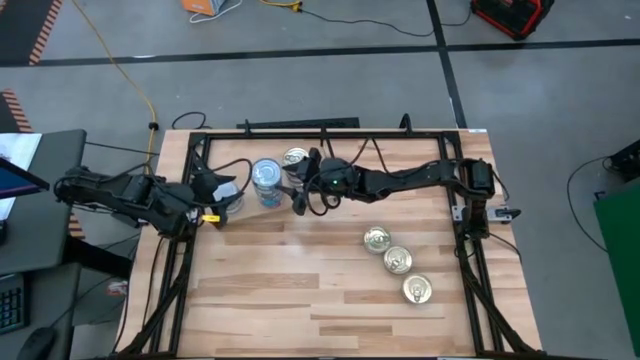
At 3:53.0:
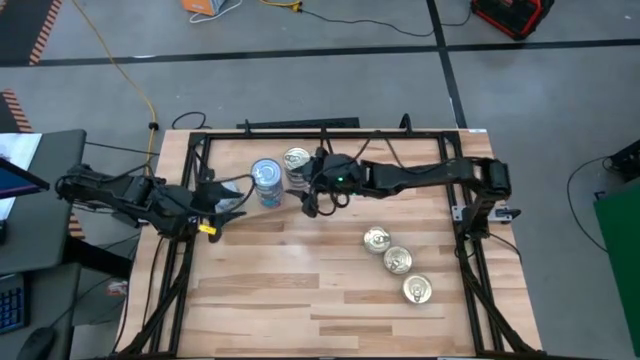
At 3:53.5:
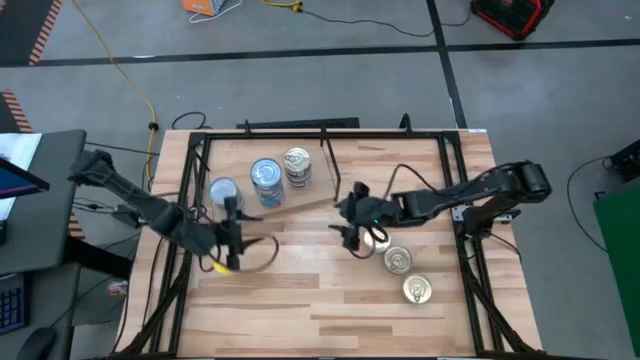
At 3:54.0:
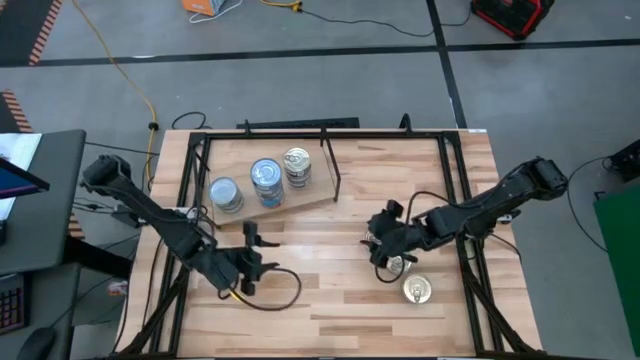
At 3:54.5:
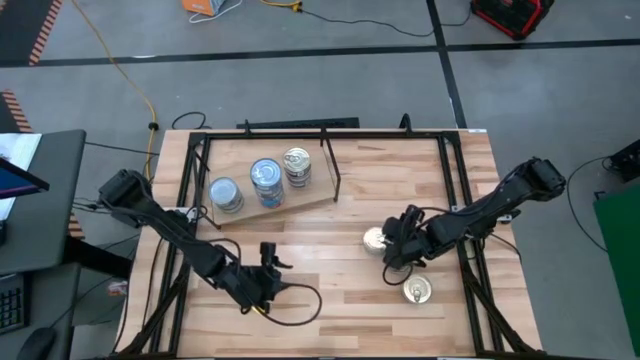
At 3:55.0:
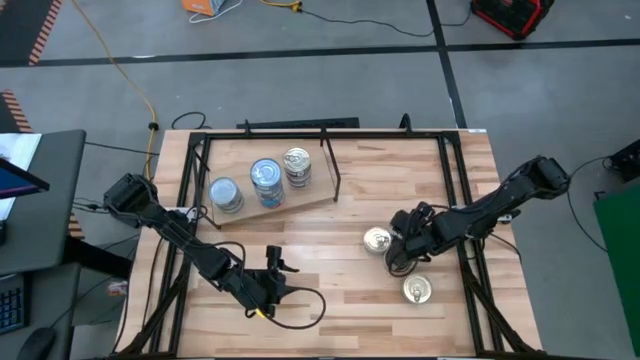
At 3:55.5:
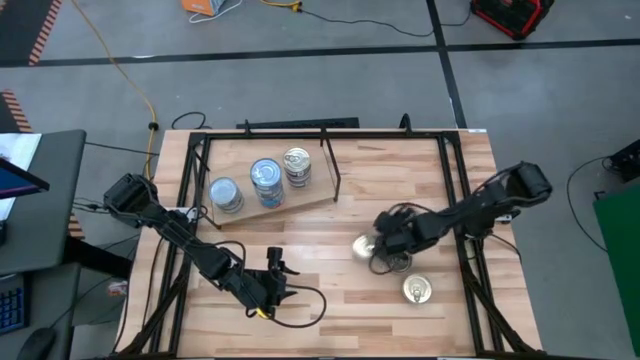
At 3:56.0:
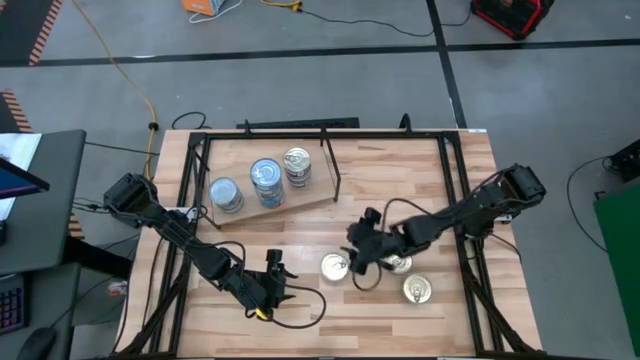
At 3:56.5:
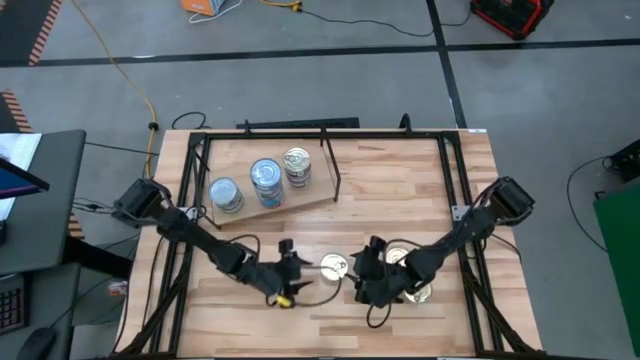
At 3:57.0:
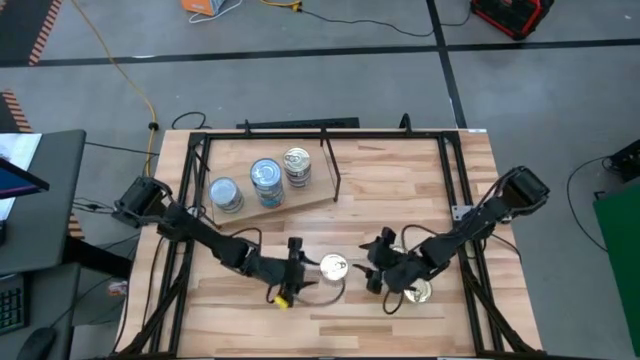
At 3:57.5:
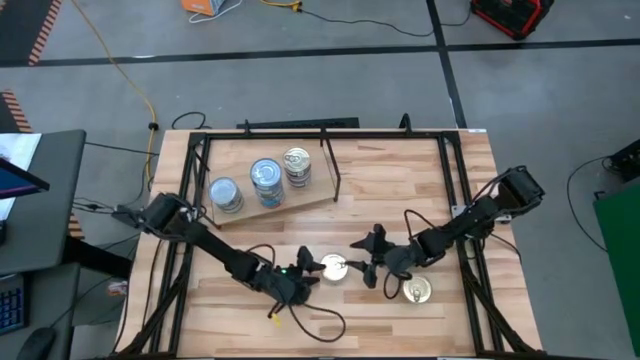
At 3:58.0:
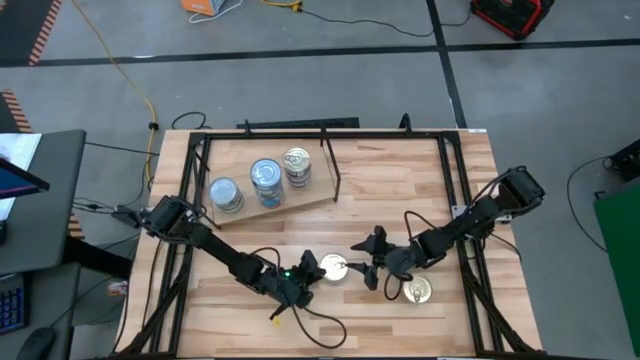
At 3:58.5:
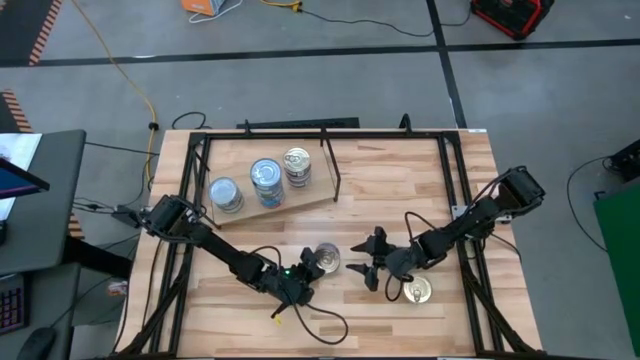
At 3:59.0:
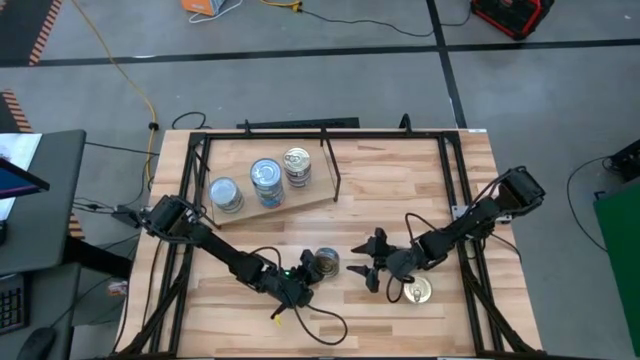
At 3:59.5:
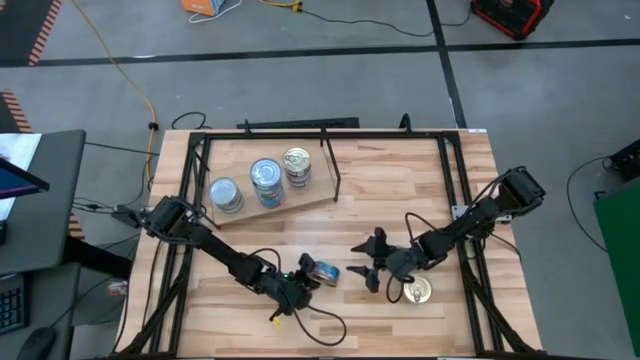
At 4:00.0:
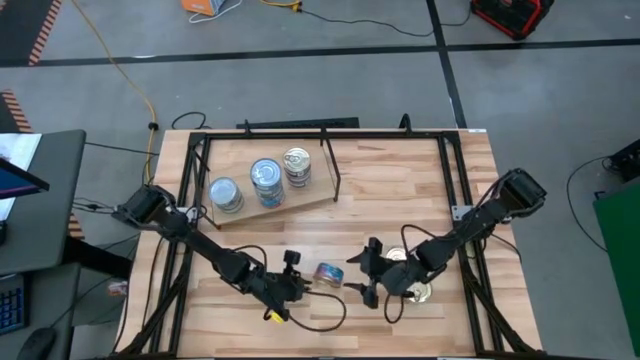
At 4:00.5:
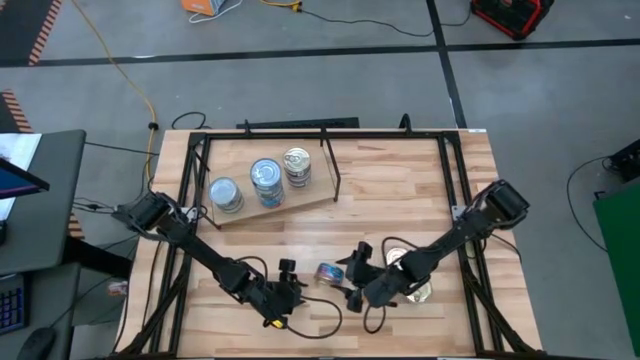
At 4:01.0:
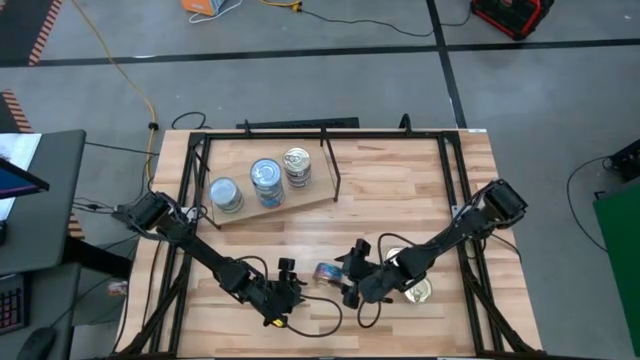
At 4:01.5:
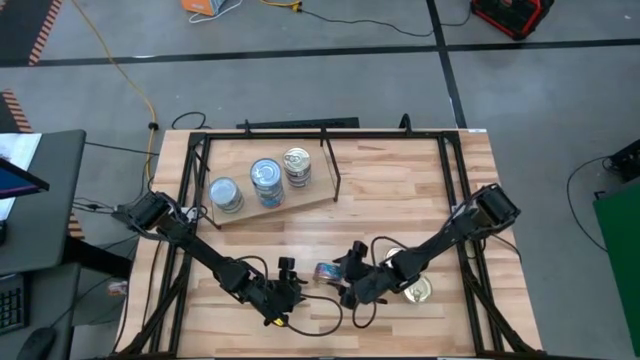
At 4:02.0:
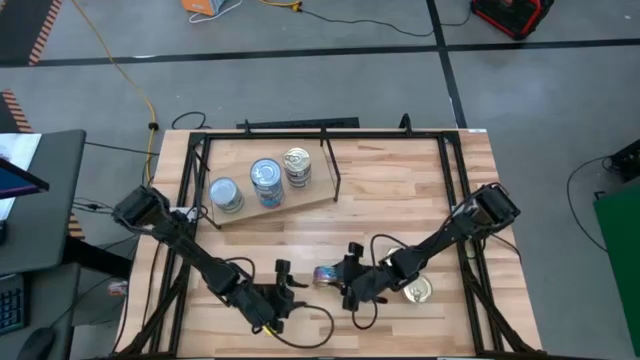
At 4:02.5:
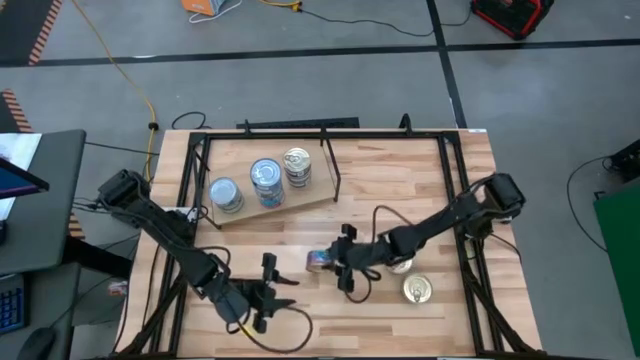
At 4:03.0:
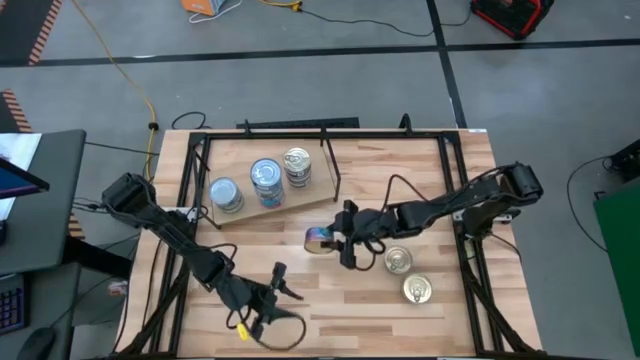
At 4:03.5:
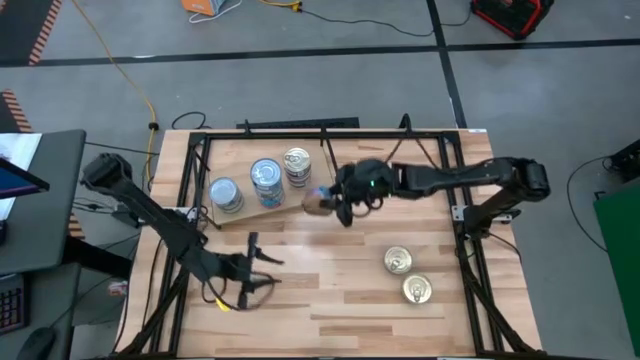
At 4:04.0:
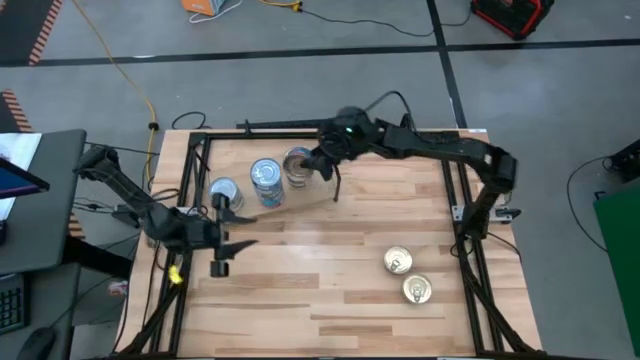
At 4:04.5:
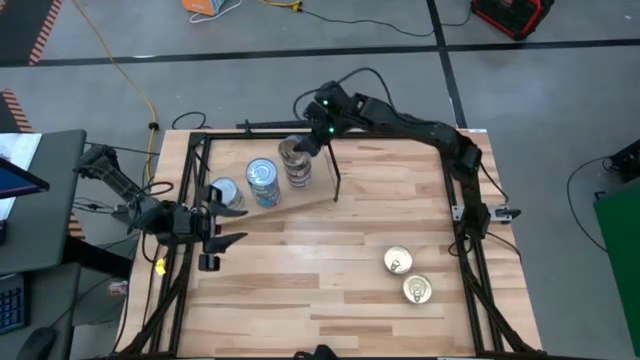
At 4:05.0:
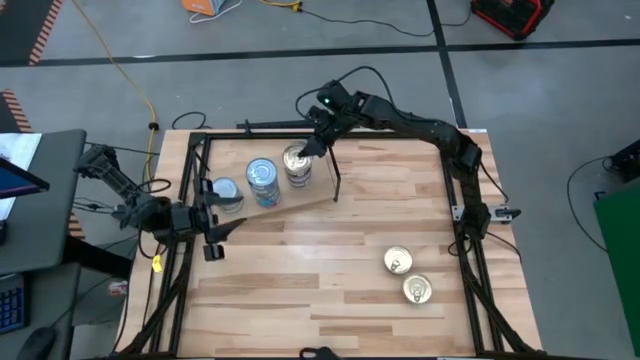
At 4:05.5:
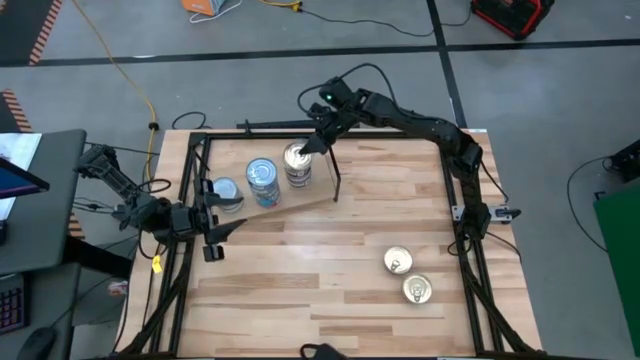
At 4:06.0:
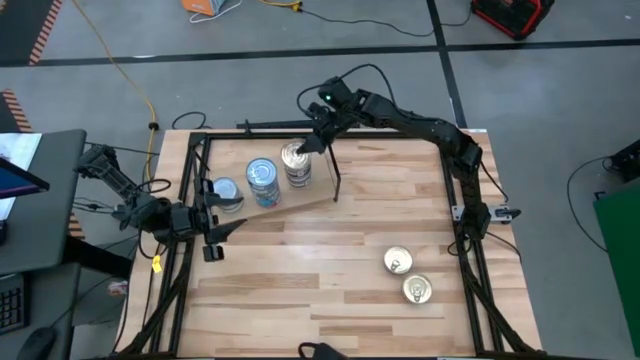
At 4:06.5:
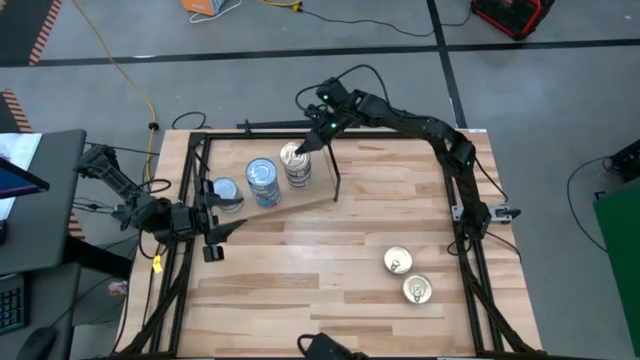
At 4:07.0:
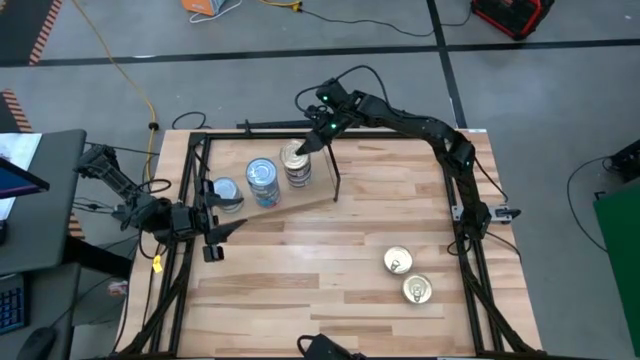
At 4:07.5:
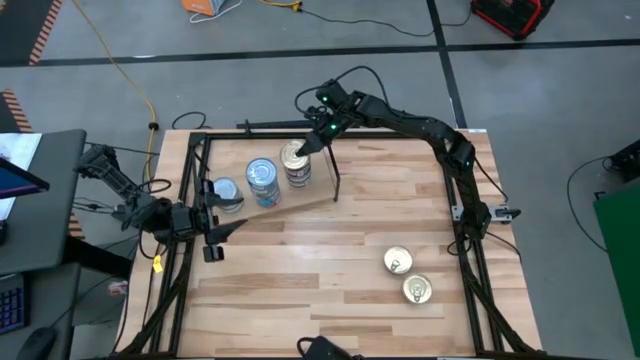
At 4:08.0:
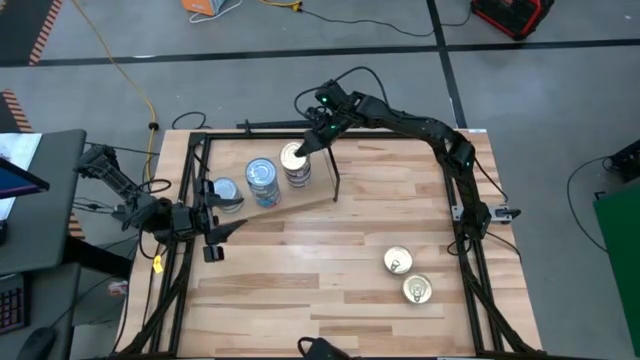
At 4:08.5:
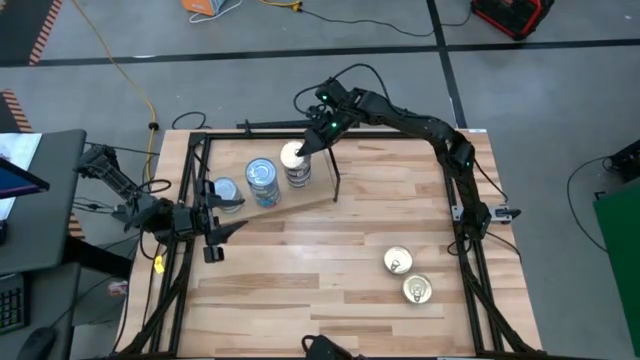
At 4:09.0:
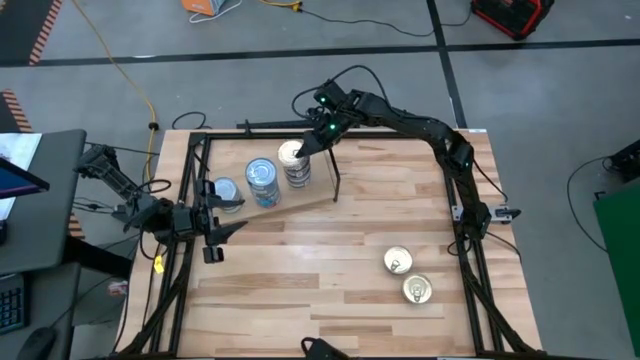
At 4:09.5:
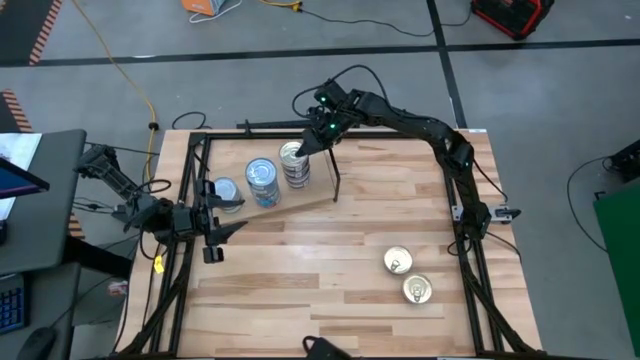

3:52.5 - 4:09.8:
Task: Stack canned seafood by type on shelf
Stack the blue pink tuna can on top of the blue pink tuna can on the shelf

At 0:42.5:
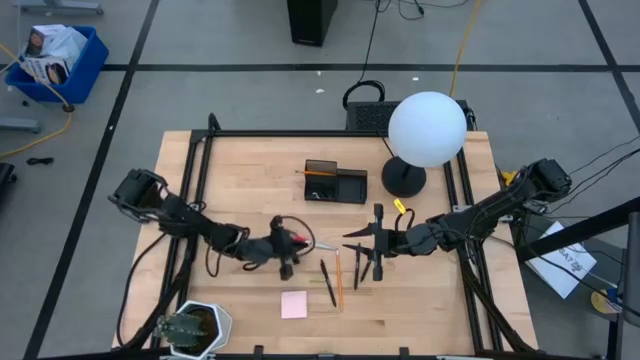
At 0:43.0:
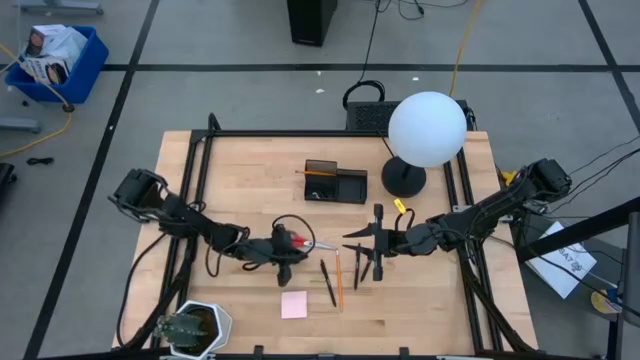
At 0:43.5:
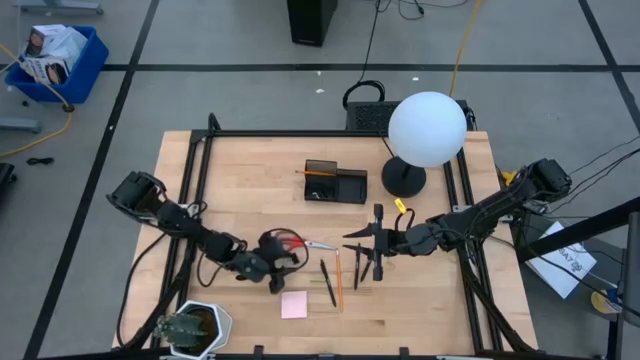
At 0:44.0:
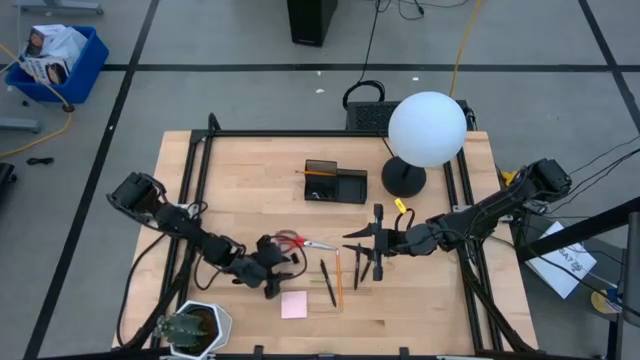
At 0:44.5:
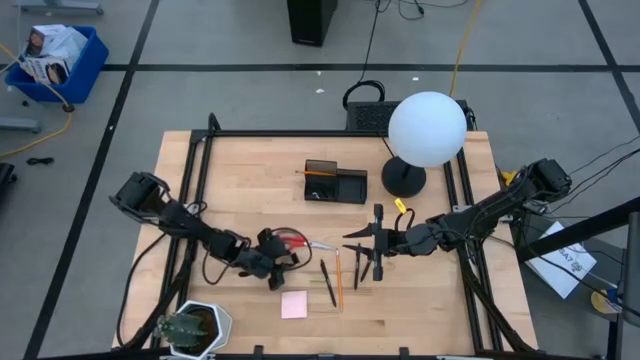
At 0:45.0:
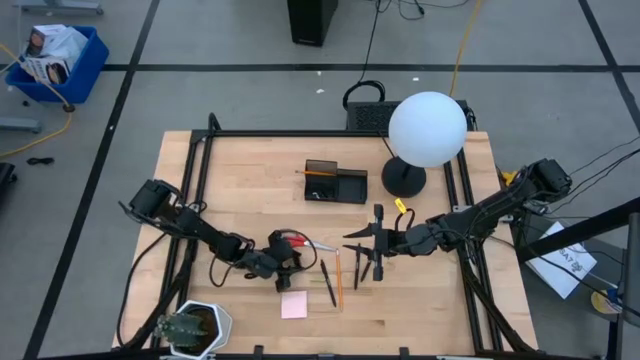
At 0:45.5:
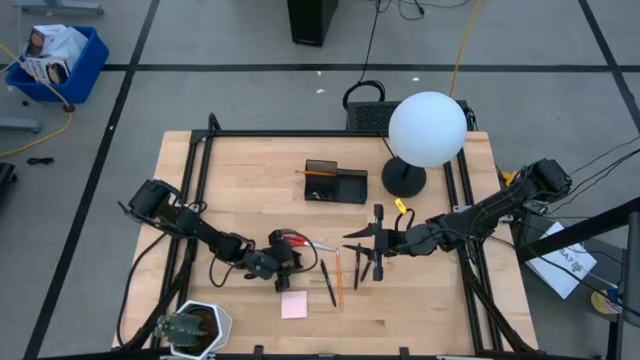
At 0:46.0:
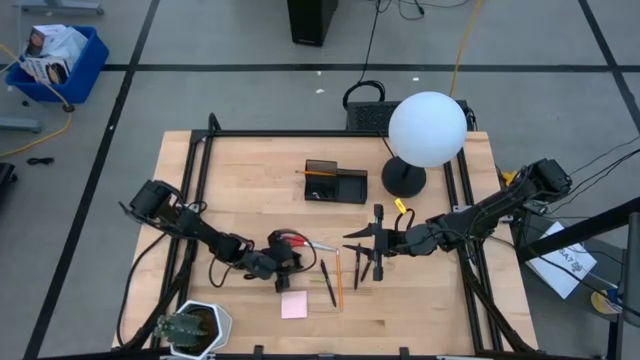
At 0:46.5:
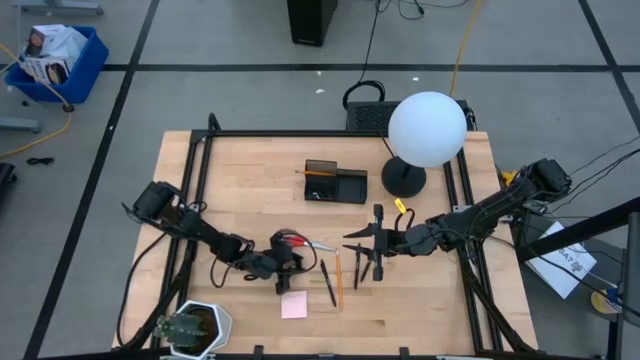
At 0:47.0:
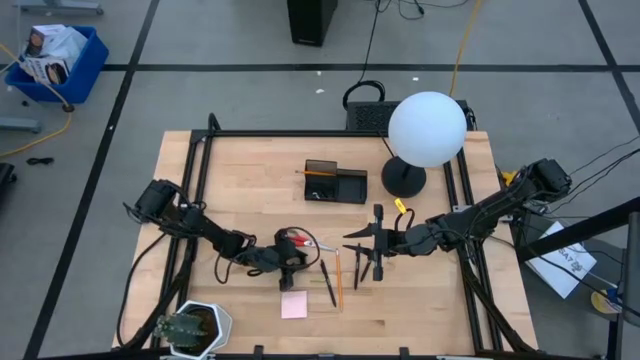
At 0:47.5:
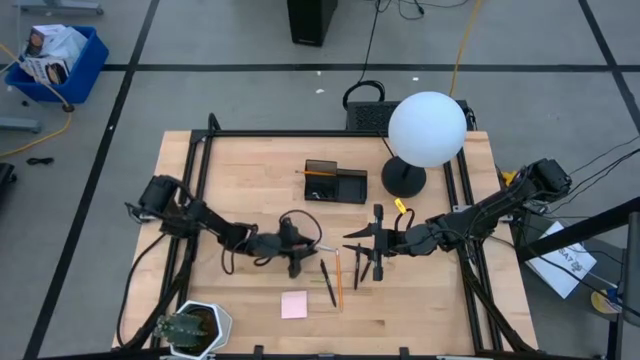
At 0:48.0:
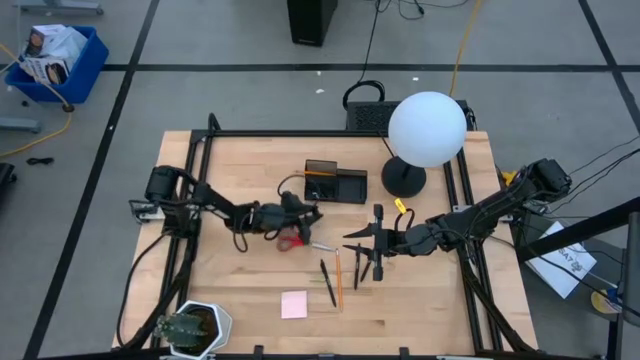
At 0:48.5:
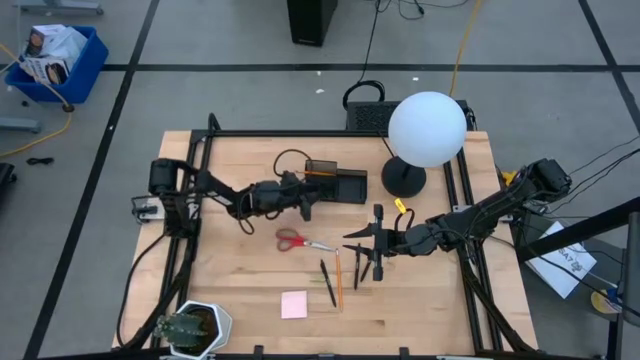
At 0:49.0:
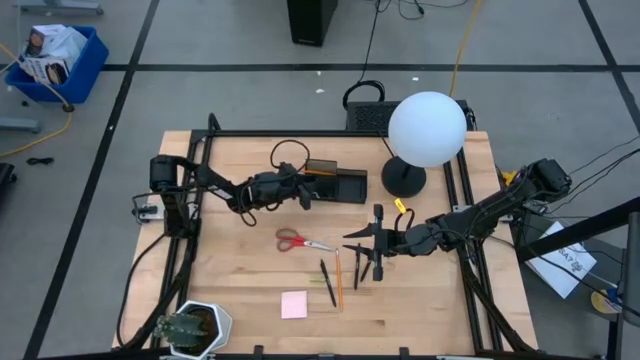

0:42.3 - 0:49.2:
Task: Pick and place office supplies into organizer
Put the black binder clip into the black desk organizer
